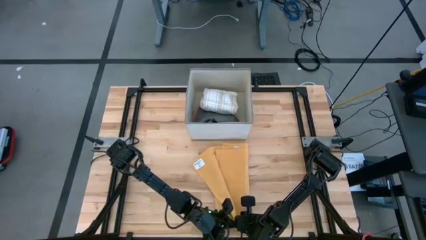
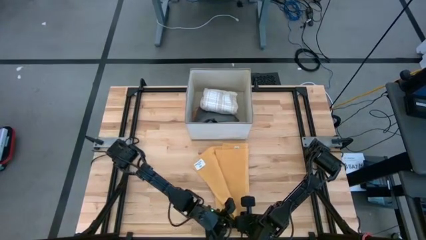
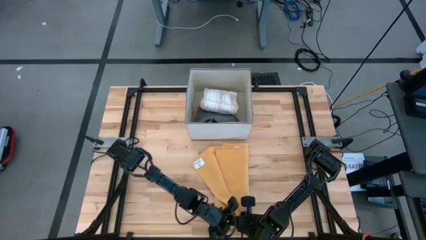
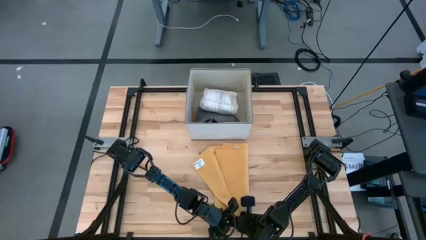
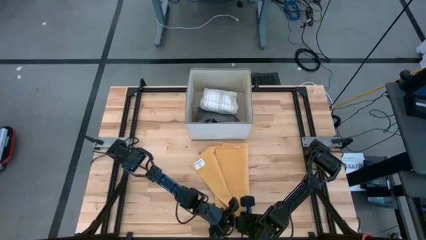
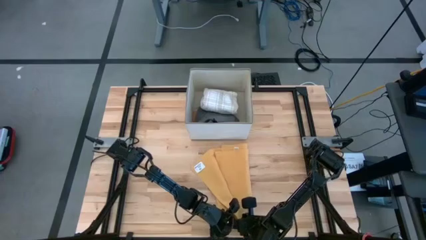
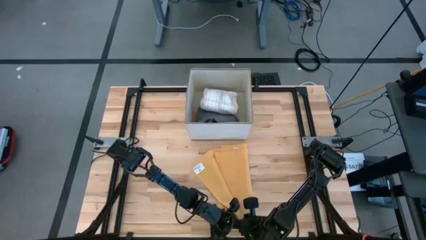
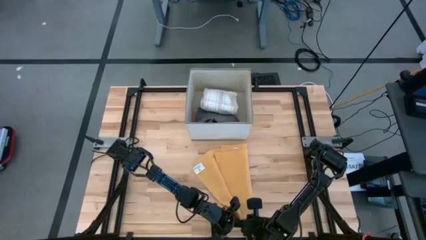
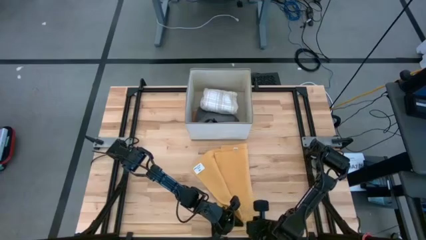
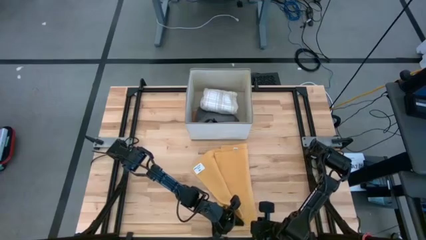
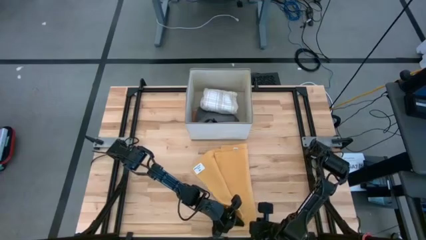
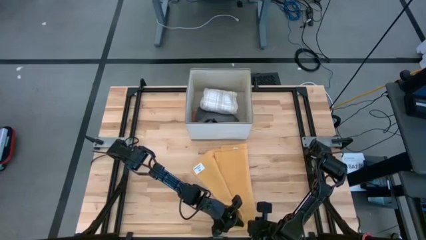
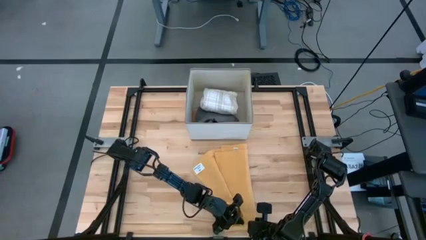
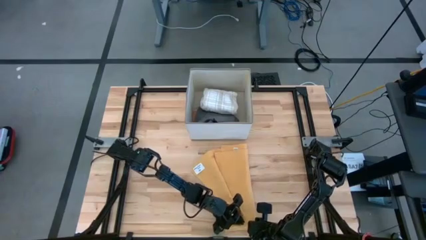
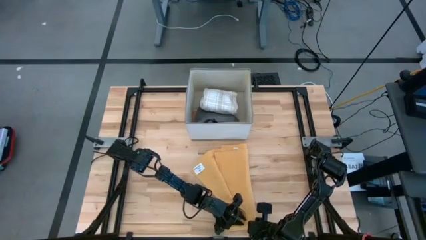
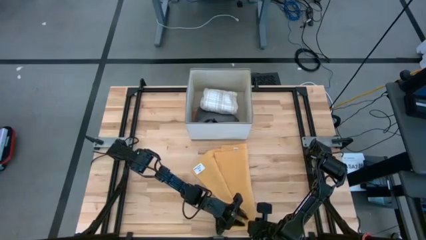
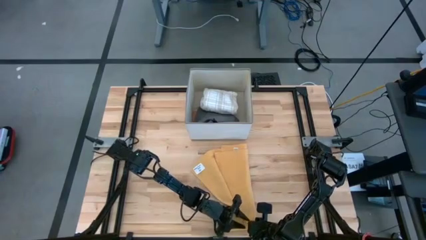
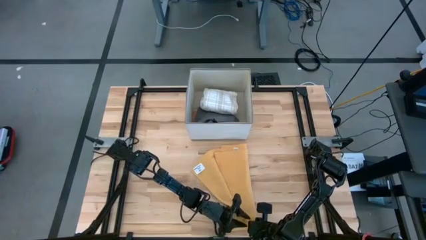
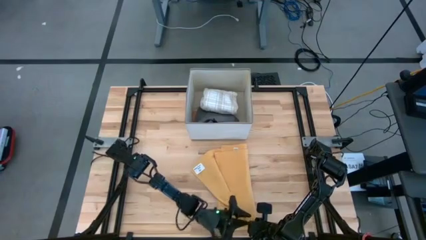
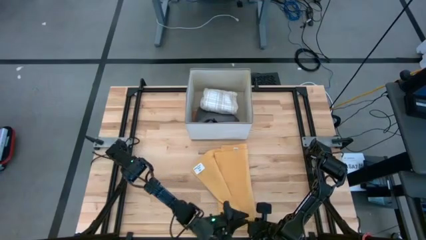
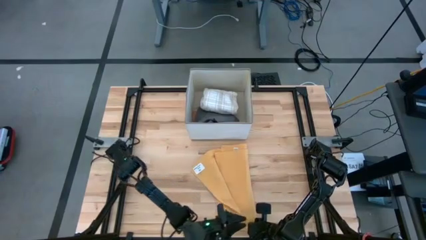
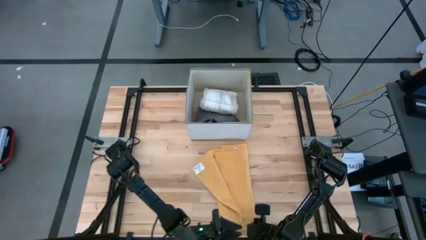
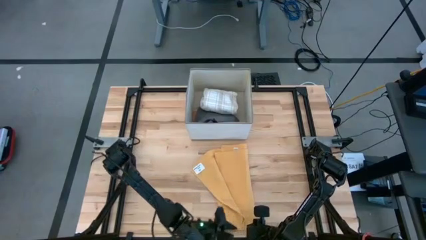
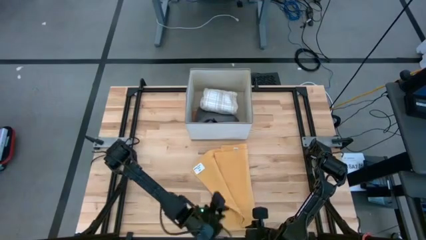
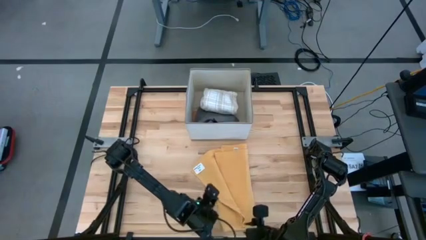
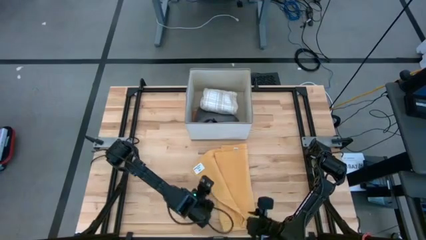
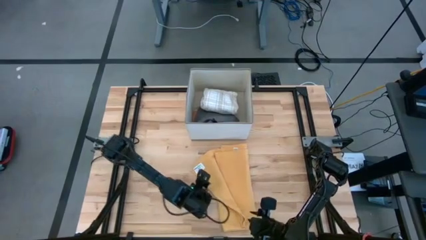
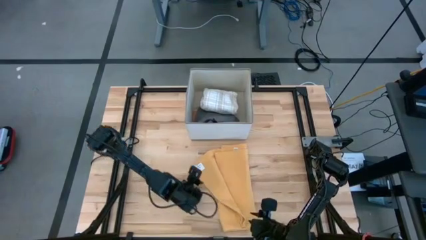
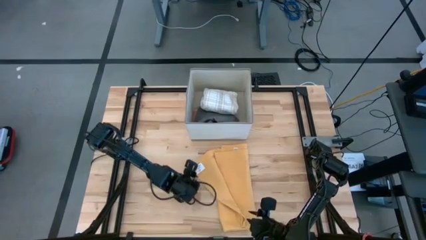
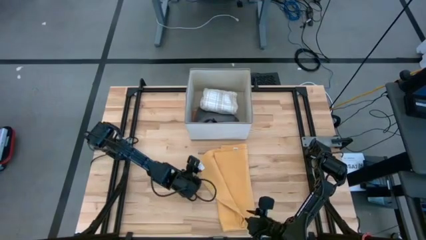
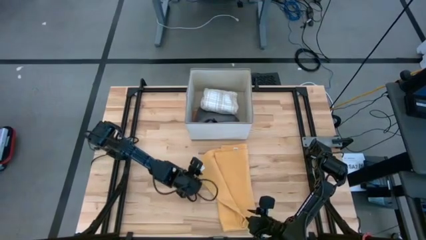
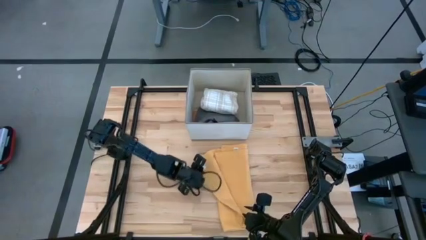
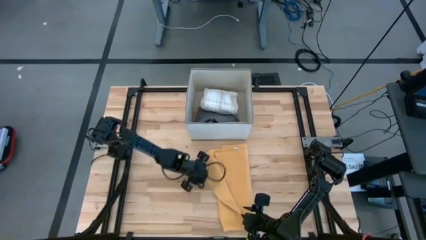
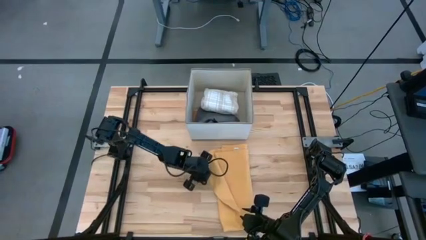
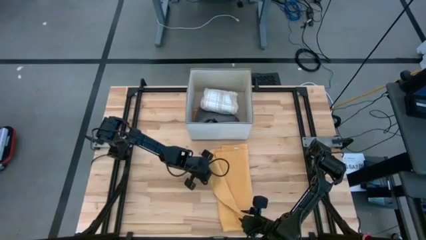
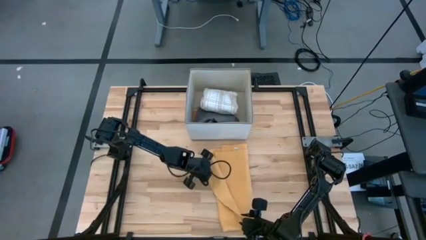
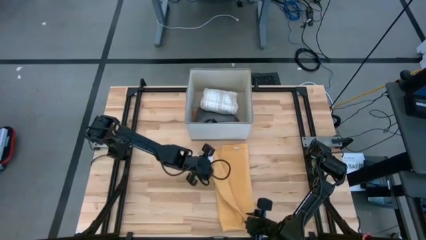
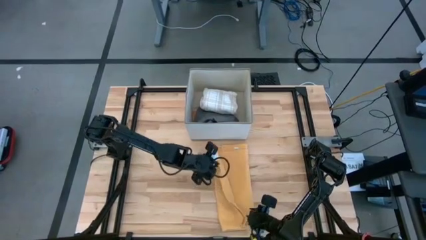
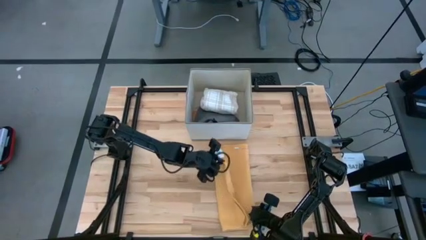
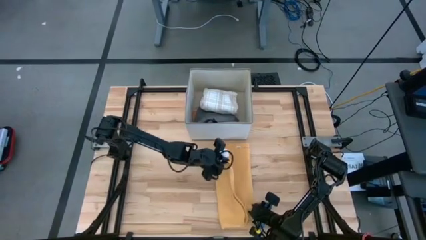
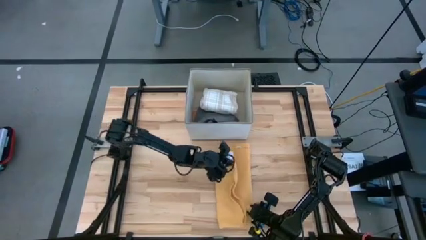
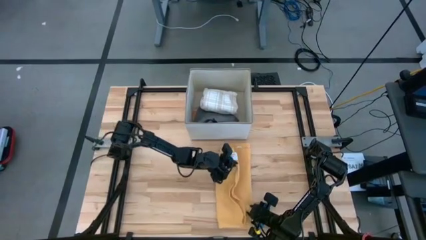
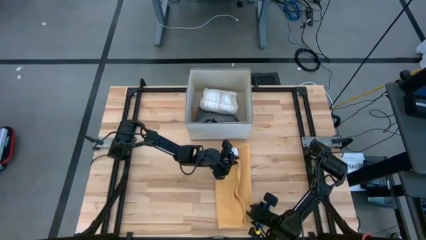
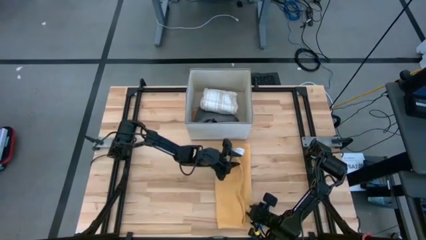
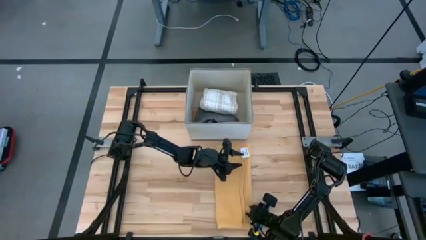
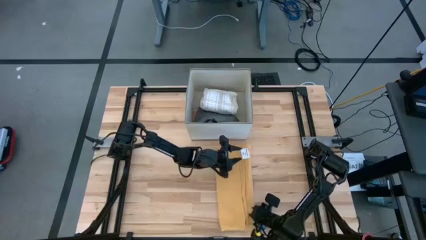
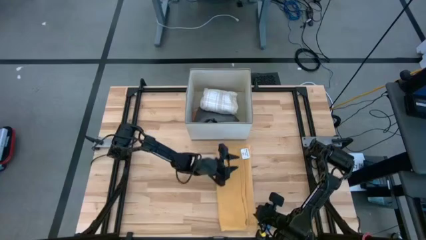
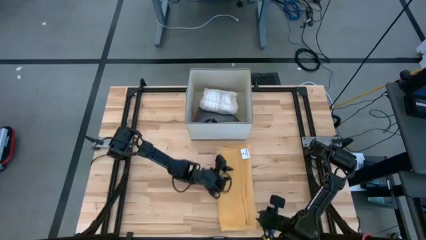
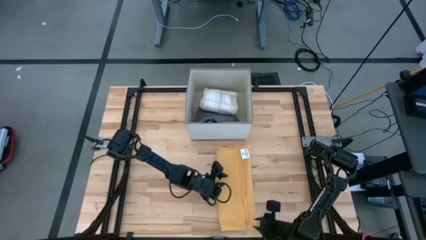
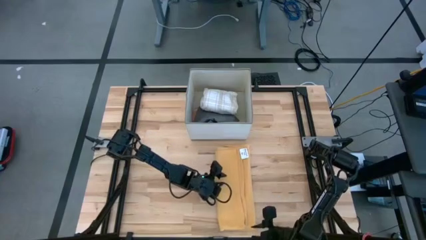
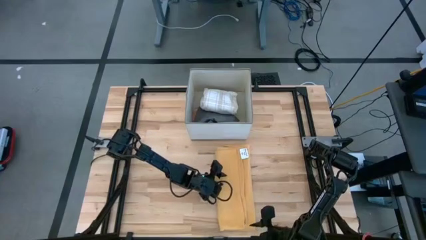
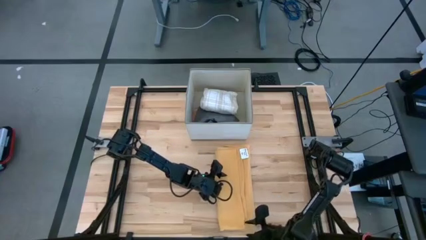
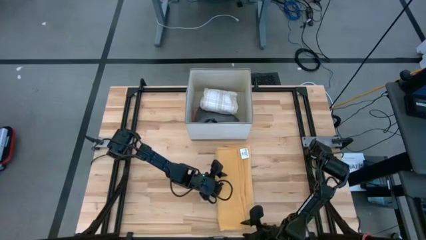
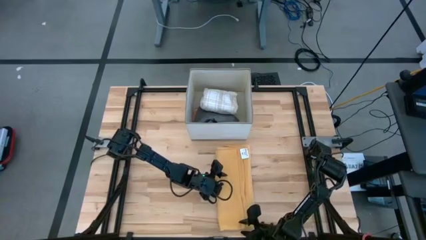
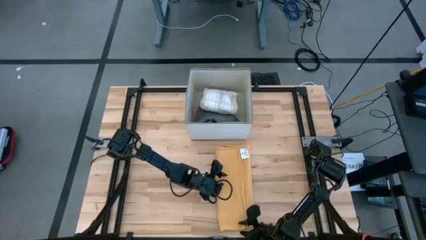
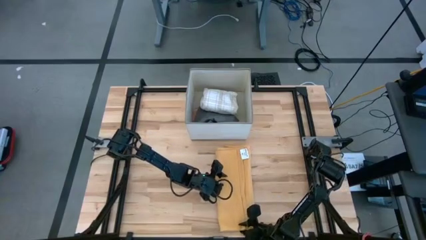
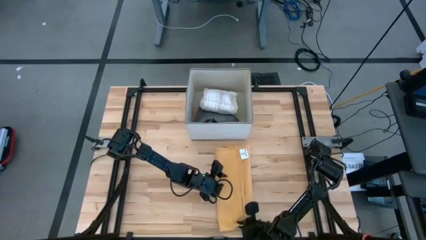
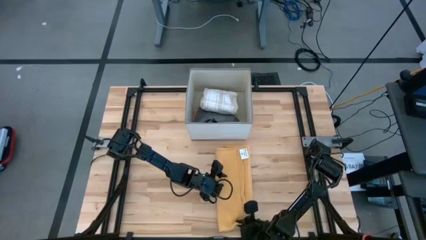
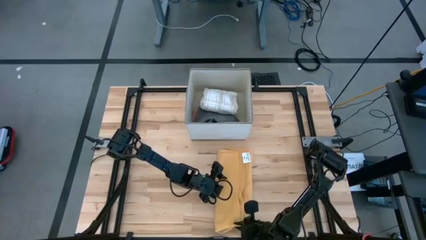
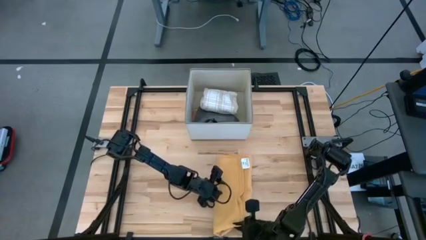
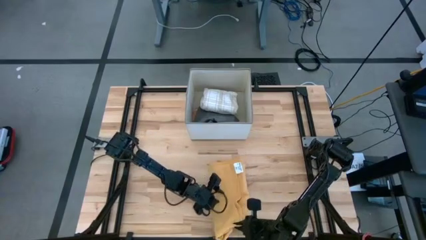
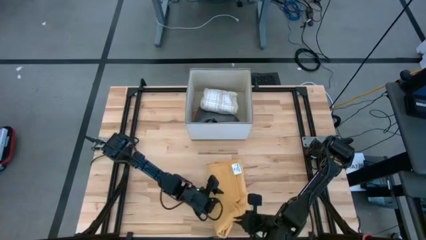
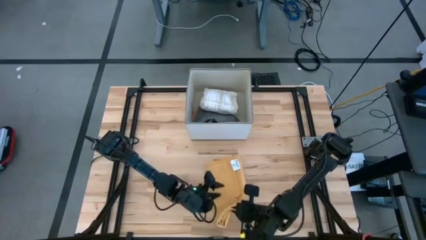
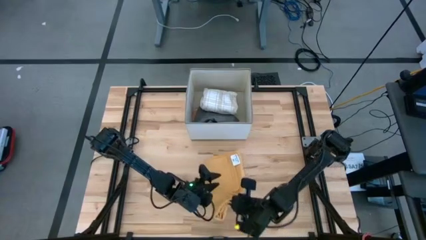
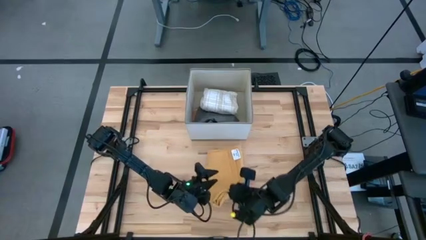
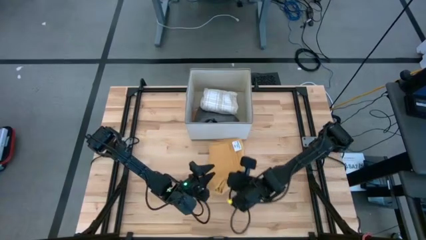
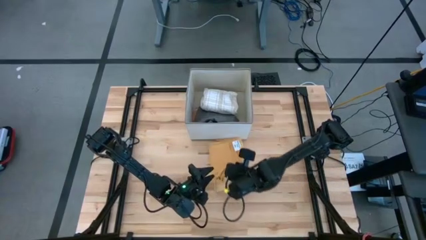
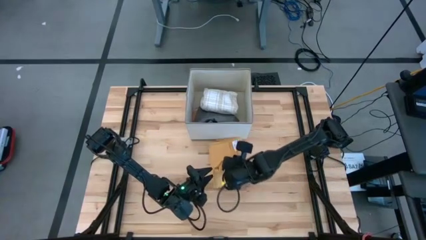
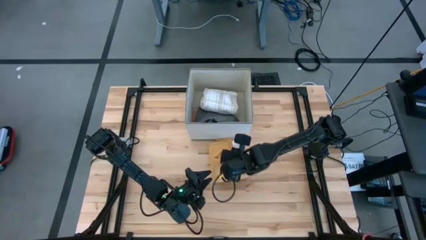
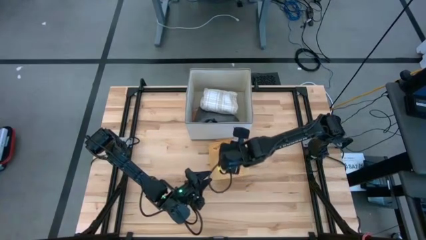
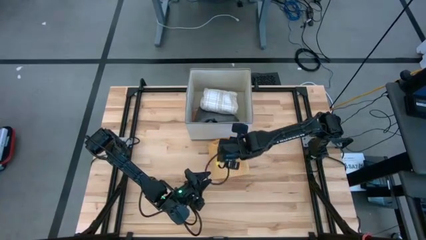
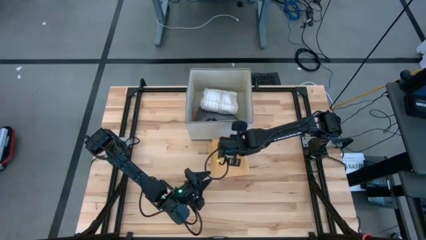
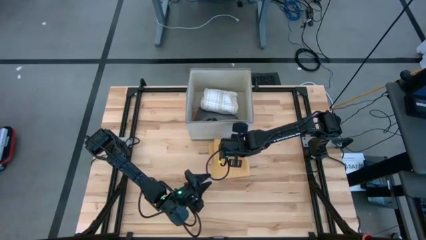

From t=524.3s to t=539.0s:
Task: Fold towel
Fold the orange towel
